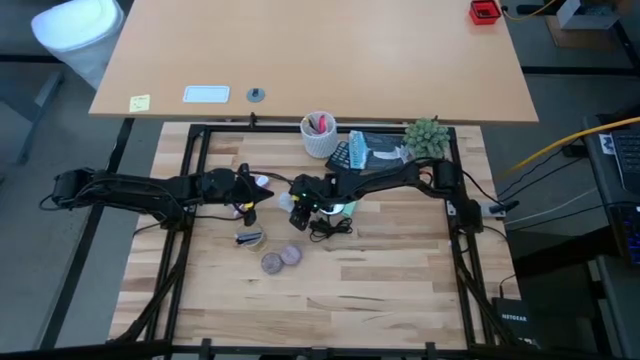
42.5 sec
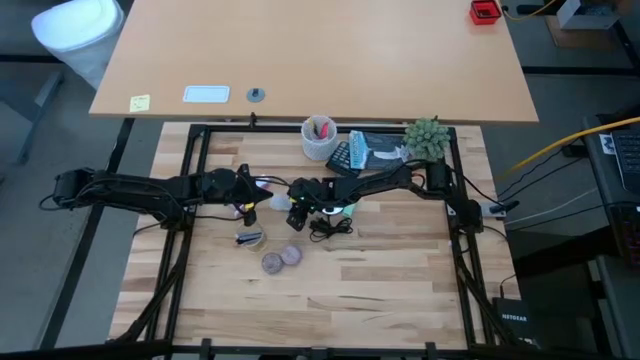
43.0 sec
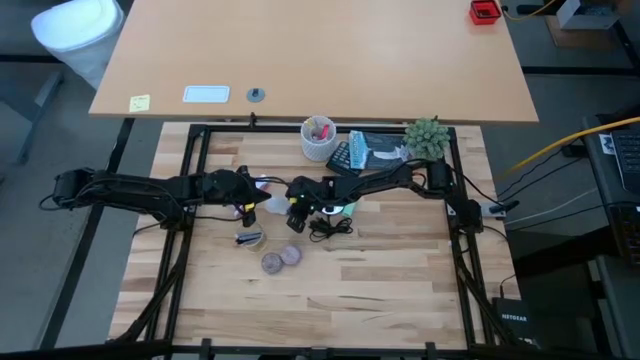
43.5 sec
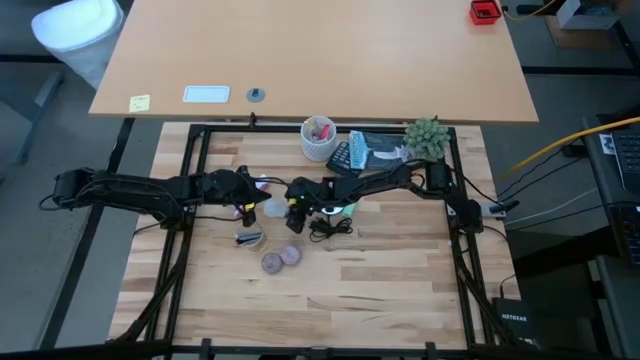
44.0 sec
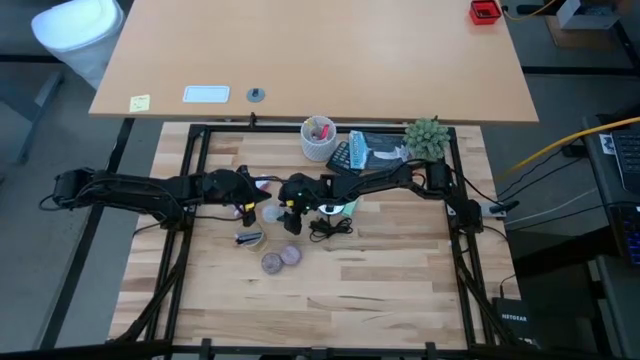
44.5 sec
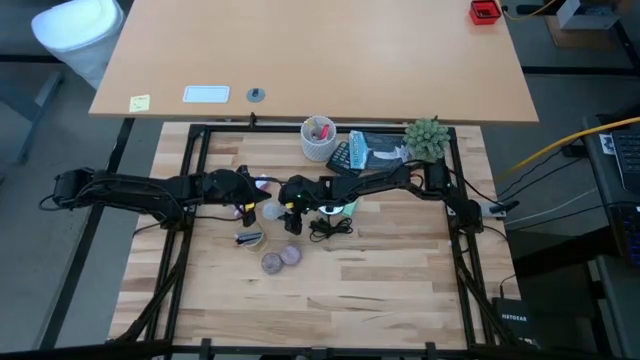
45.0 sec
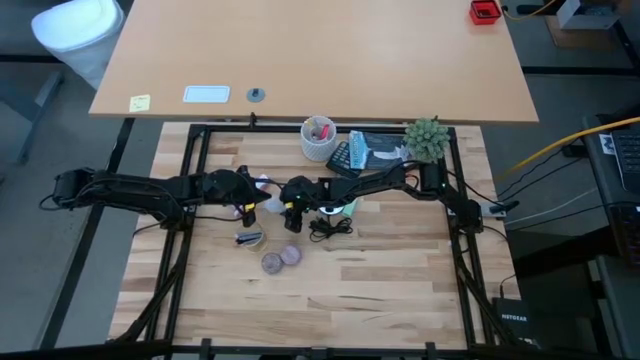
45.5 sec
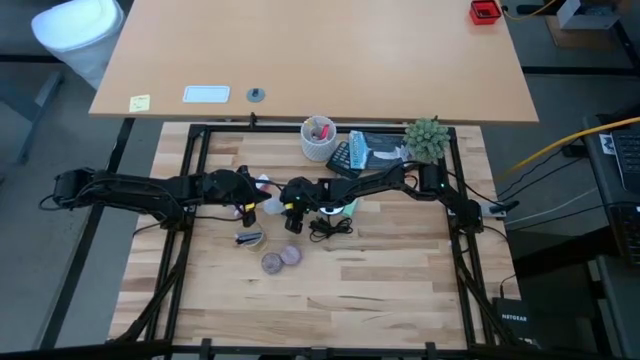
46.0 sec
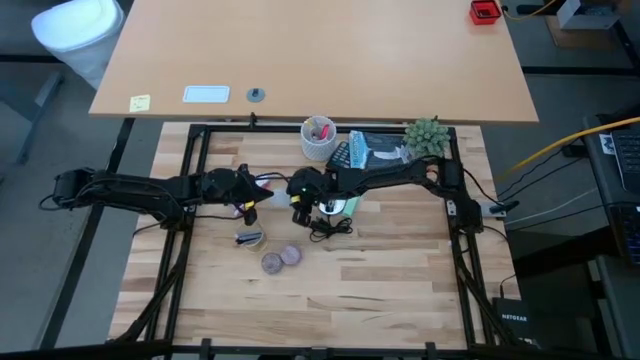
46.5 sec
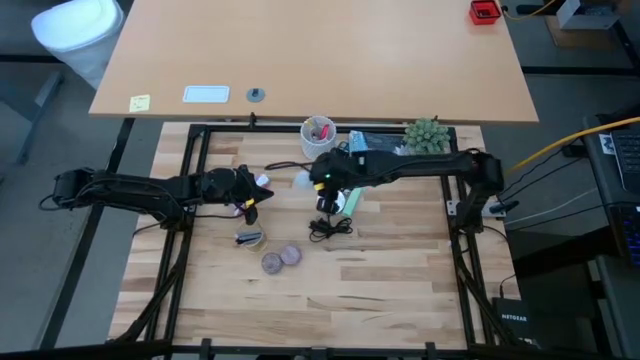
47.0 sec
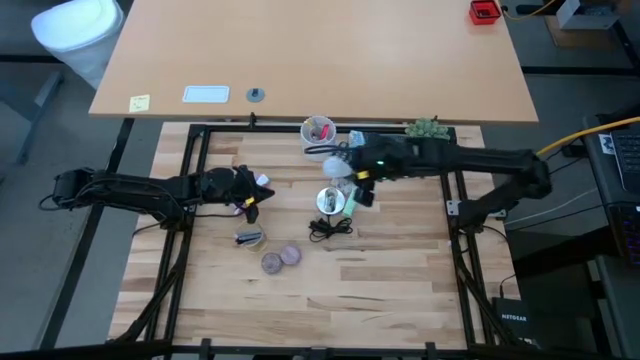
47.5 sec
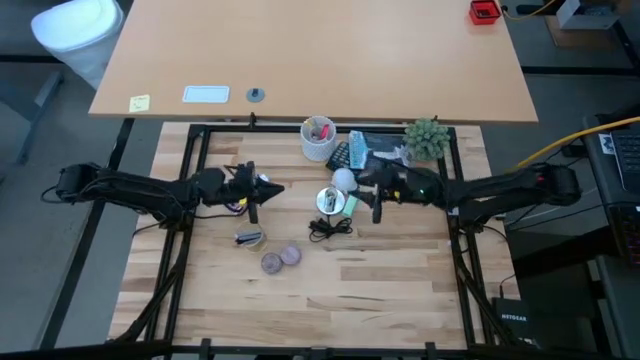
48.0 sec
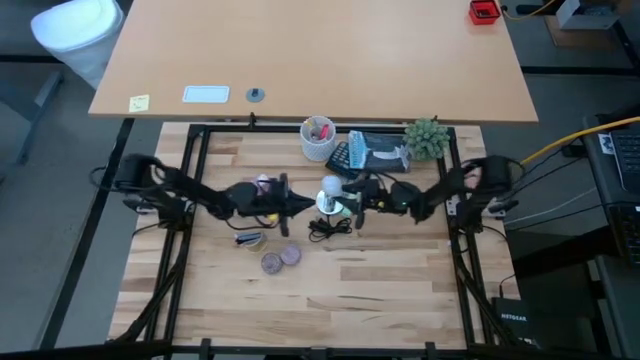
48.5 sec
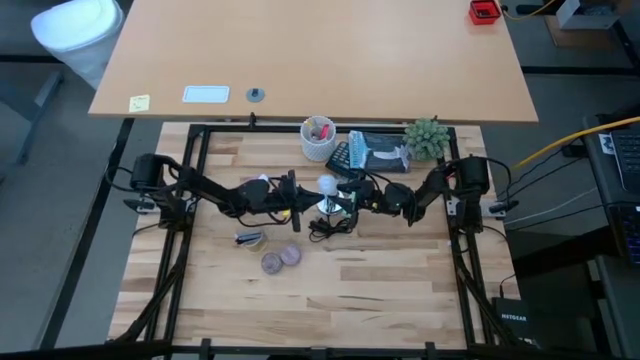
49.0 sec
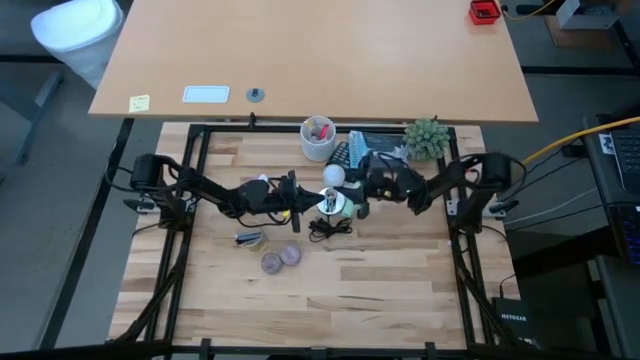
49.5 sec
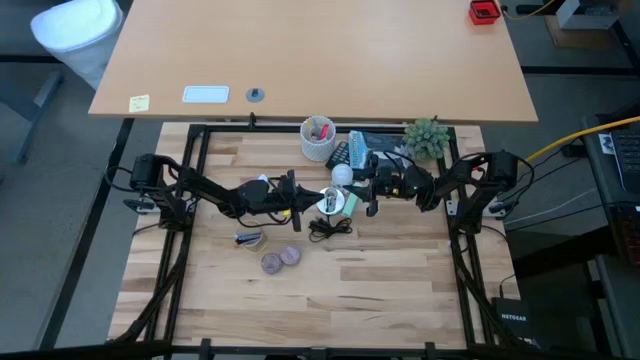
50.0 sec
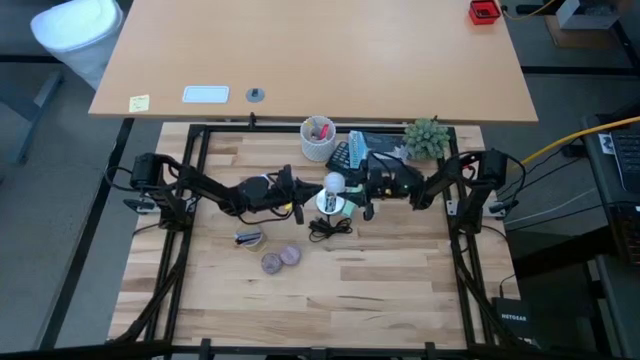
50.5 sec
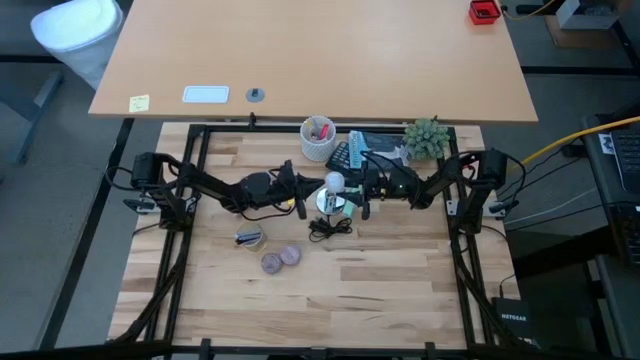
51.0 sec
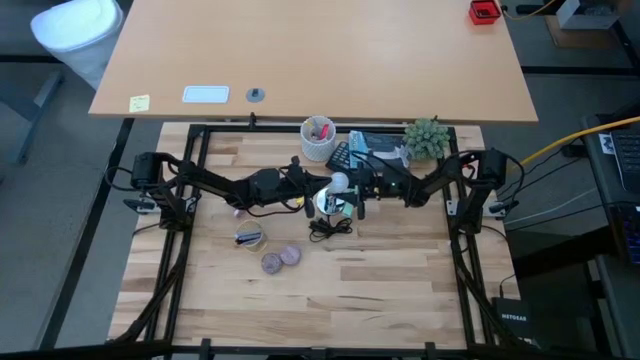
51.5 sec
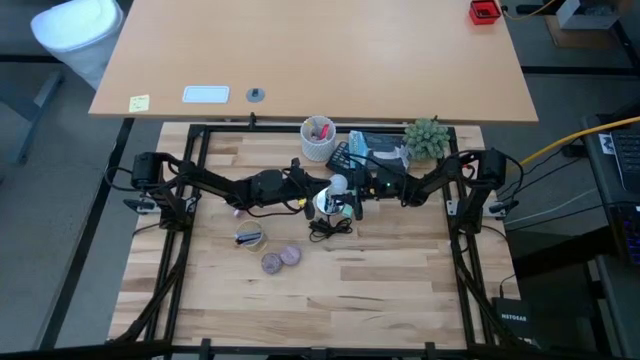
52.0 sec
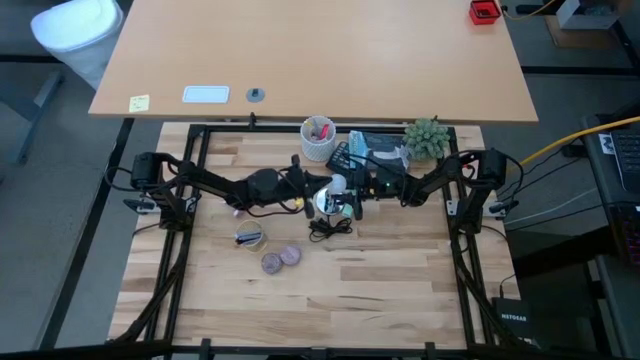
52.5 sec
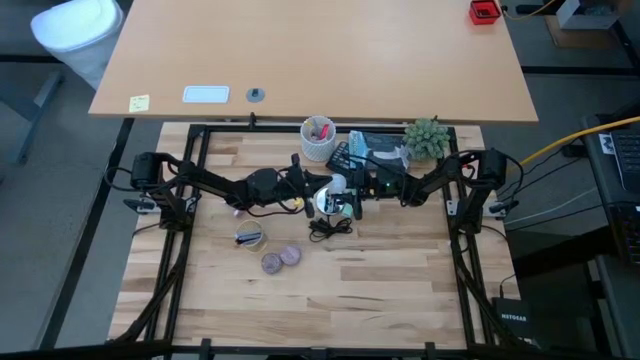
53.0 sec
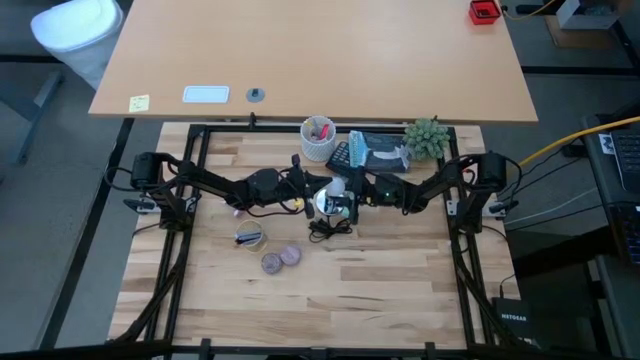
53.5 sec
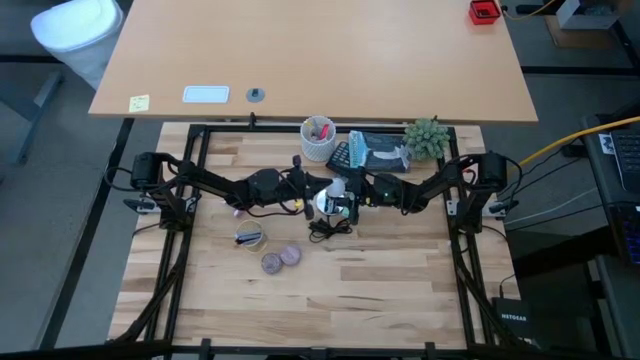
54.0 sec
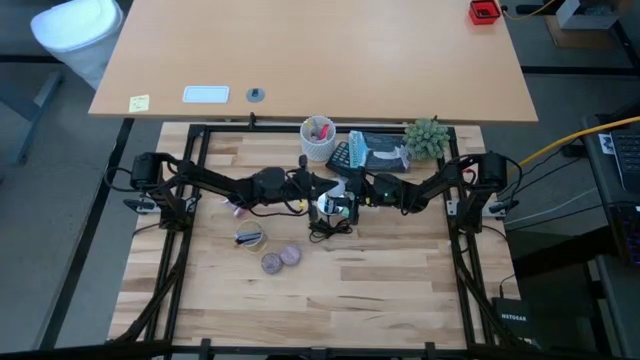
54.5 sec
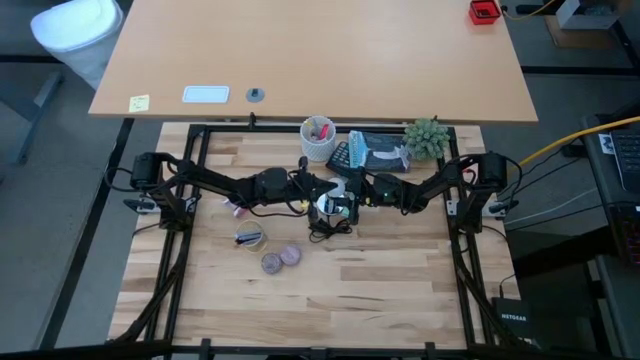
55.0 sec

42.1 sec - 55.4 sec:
Task: Screw lightbulb
Insert the white lightbulb into the silver lamp
